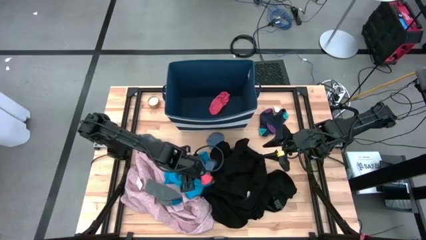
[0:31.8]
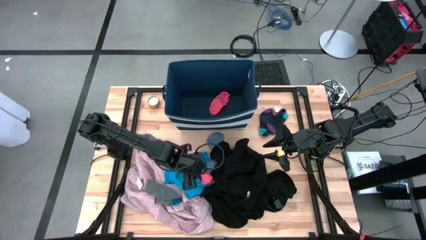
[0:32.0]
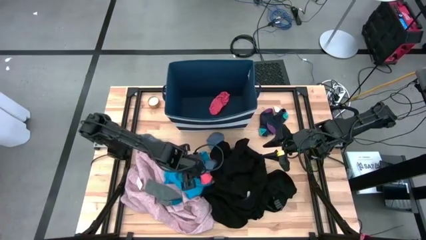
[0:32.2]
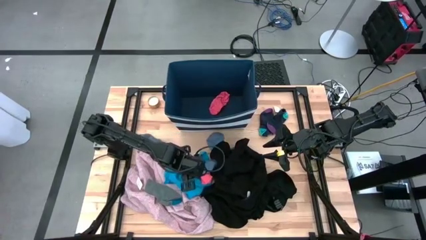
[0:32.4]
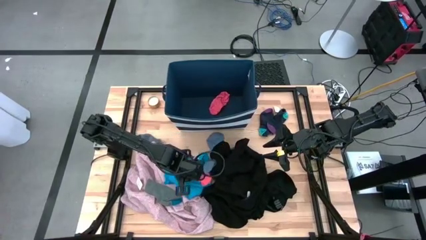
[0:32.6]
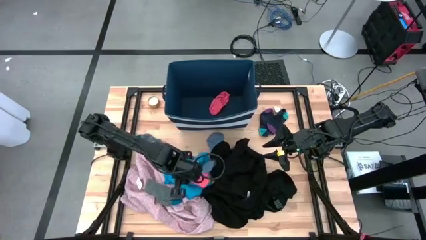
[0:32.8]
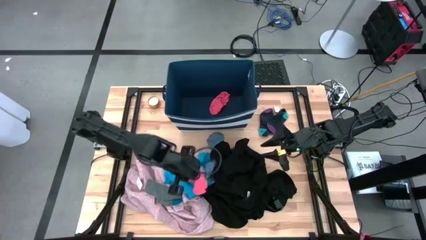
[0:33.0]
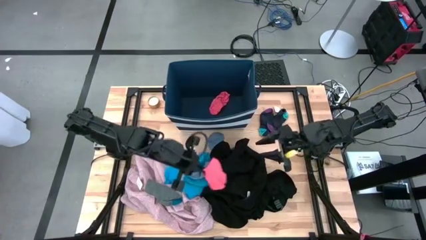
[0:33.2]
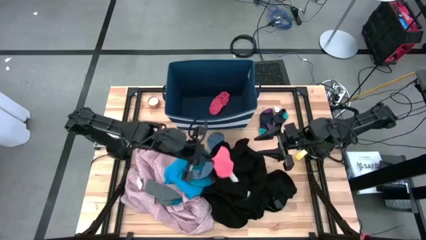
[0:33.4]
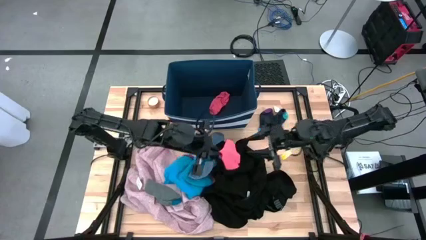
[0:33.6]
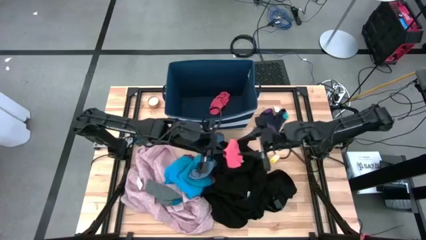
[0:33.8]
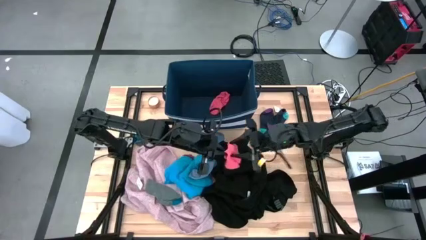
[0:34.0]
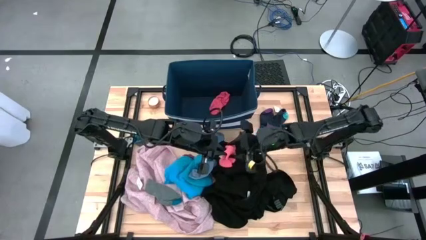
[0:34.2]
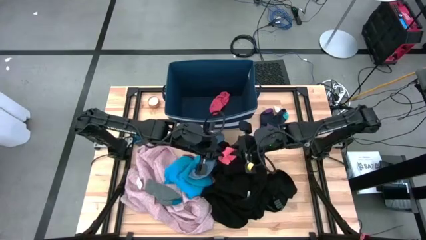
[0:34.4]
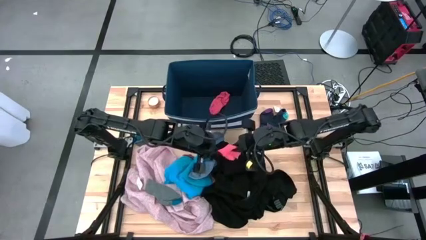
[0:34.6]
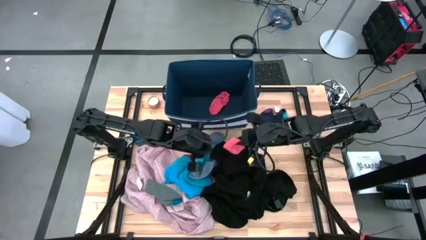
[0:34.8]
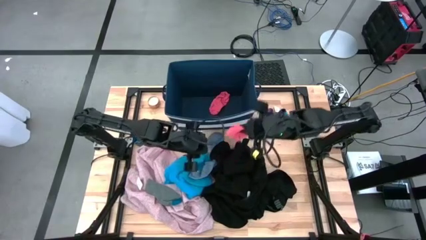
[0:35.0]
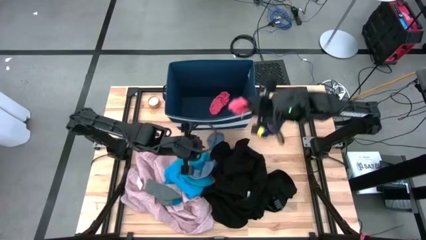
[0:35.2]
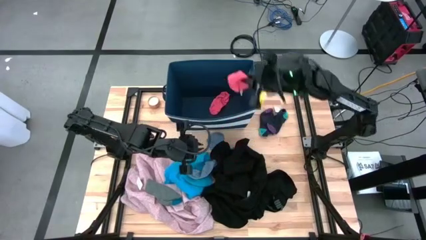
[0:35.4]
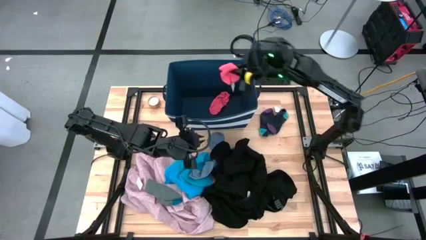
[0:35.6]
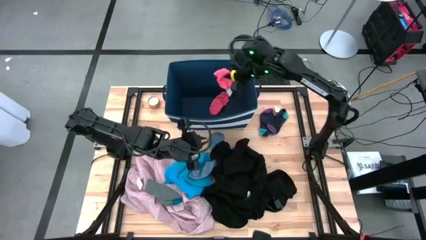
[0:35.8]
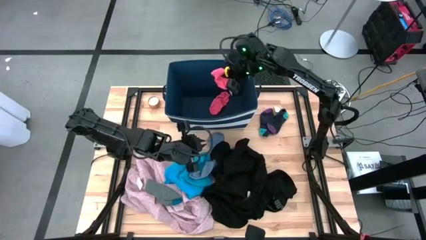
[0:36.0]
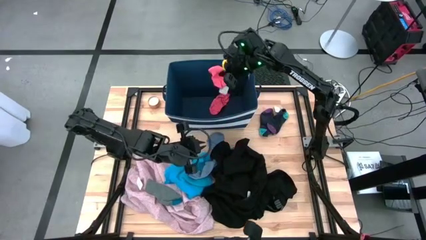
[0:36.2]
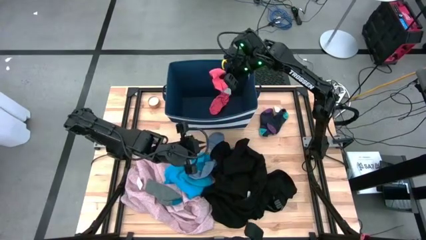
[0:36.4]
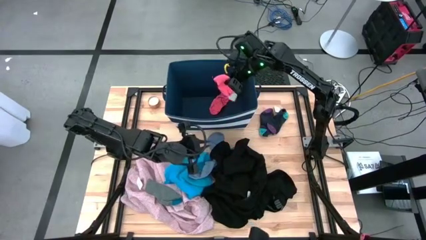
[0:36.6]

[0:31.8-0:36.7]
Task: Sort clothes
Put the pink sock into the blue laundry bin

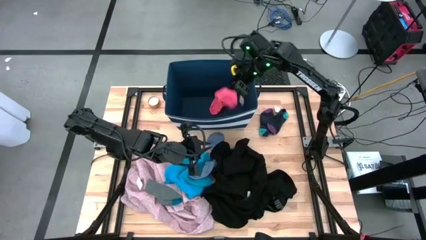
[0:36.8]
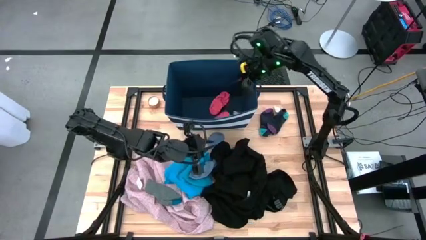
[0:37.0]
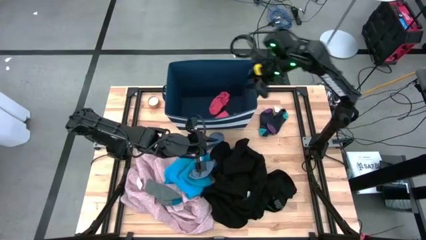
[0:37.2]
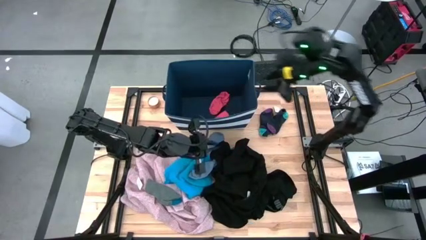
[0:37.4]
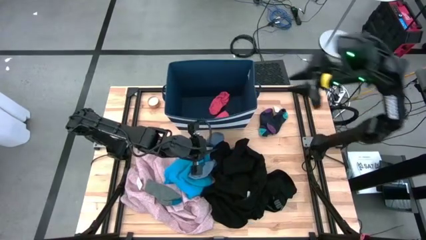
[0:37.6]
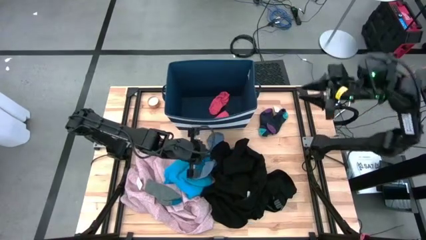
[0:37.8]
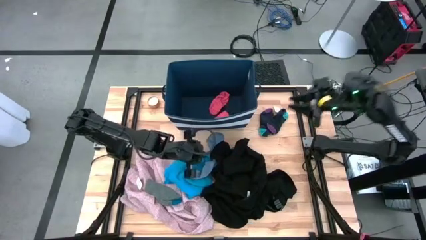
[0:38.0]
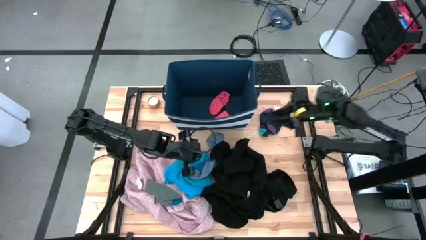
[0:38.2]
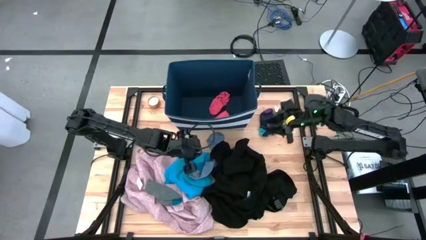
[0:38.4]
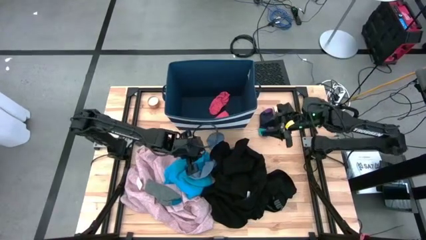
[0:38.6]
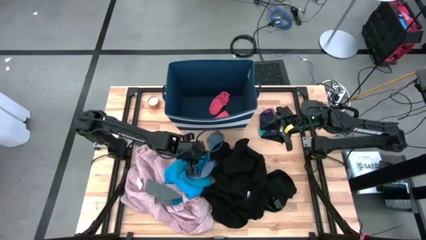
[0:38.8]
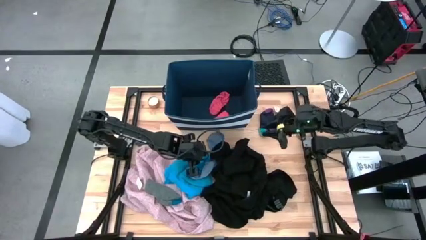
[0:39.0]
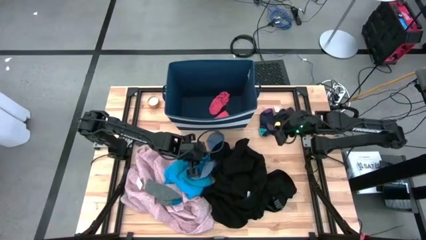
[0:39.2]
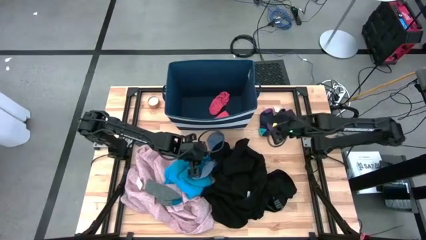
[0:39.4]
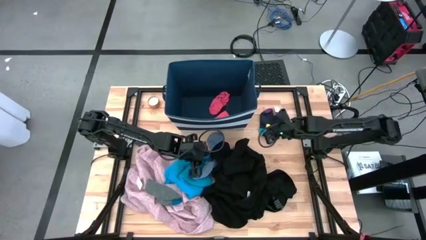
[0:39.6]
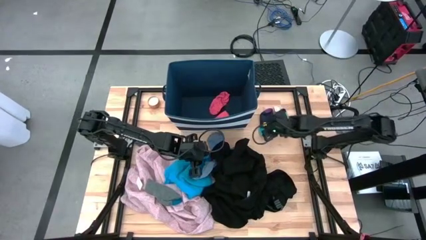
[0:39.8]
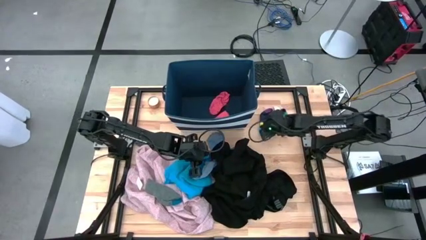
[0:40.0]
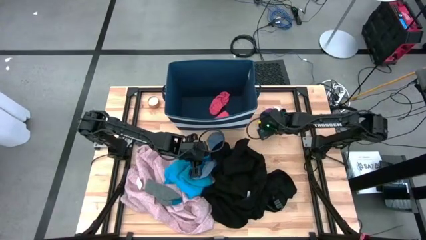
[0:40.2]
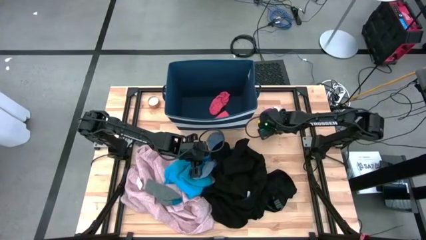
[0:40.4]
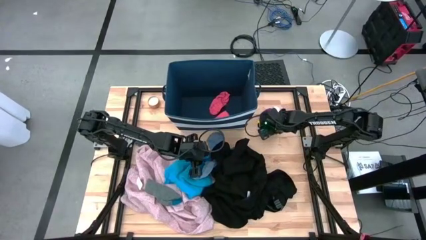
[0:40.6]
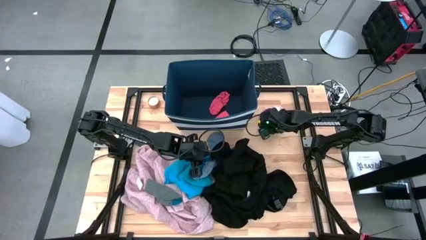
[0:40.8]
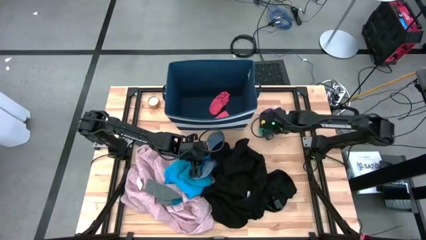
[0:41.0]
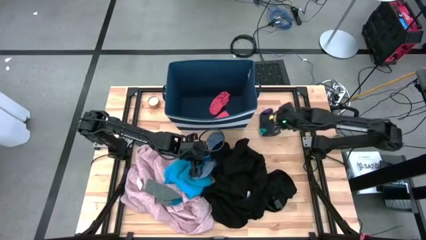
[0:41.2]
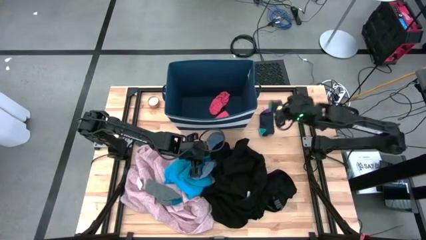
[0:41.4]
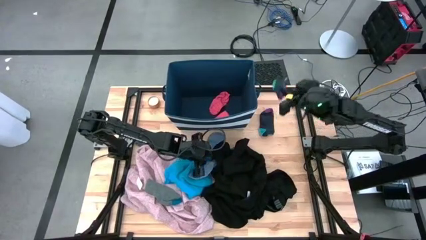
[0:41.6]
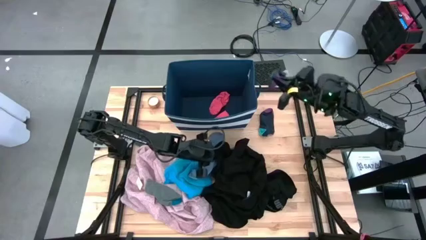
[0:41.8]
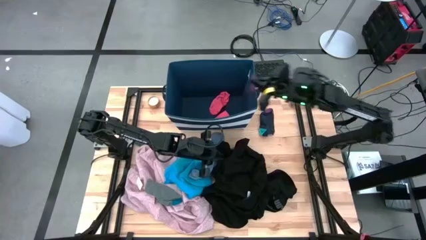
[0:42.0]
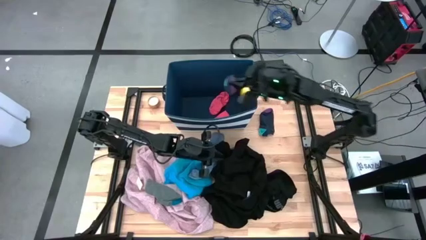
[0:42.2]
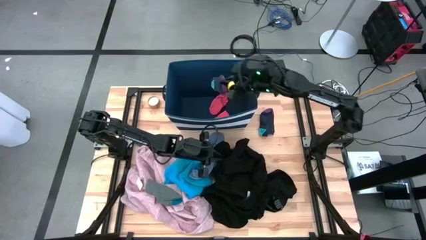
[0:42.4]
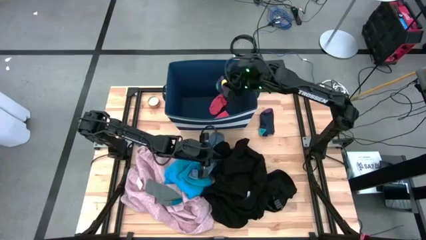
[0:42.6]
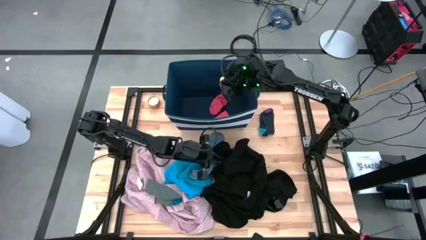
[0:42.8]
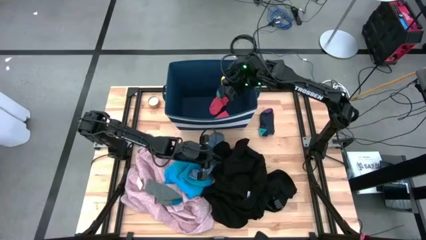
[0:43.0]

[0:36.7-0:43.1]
Put the dark blue sock into the blue laundry bin

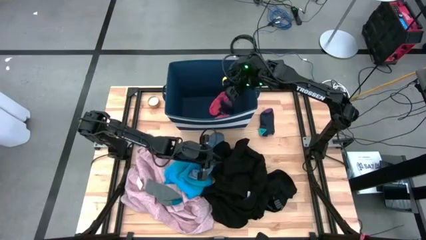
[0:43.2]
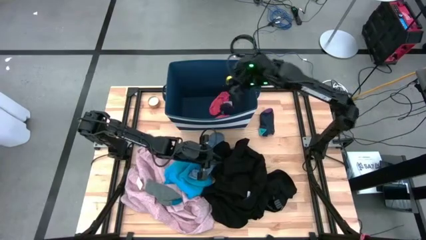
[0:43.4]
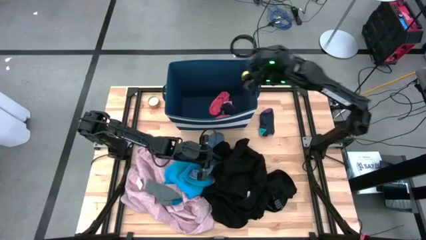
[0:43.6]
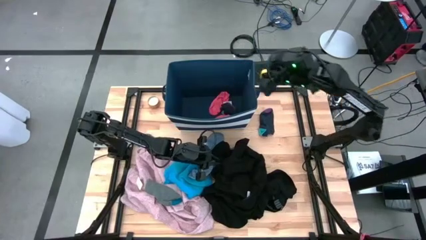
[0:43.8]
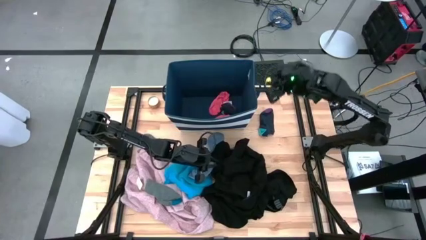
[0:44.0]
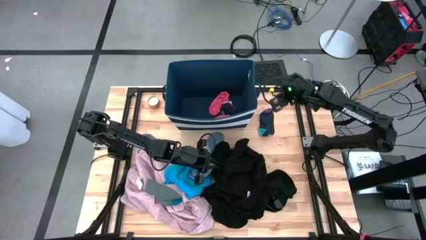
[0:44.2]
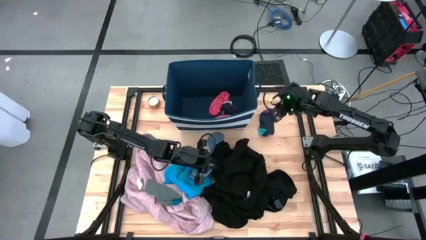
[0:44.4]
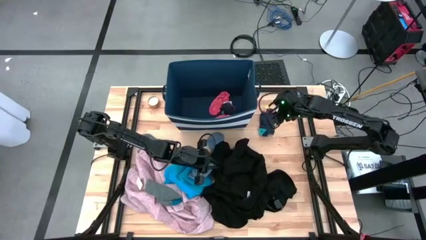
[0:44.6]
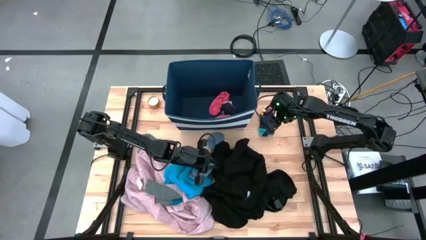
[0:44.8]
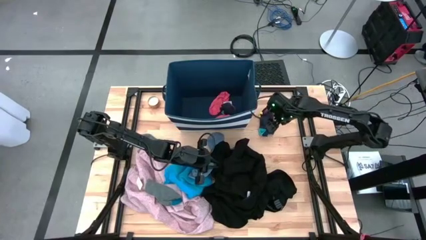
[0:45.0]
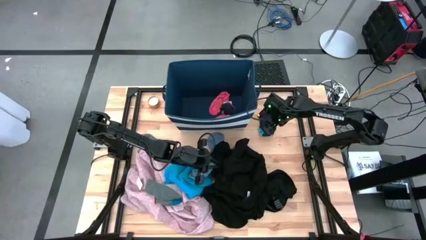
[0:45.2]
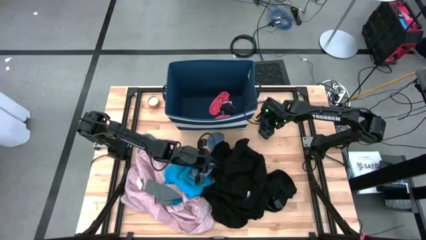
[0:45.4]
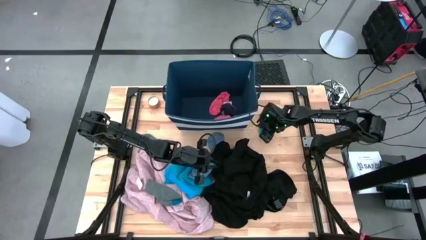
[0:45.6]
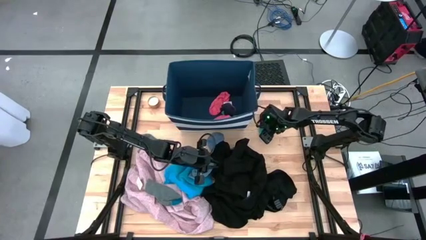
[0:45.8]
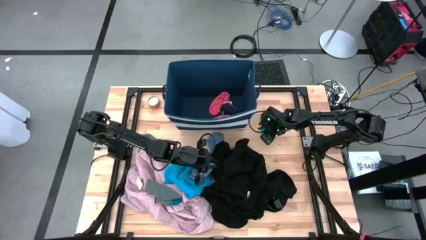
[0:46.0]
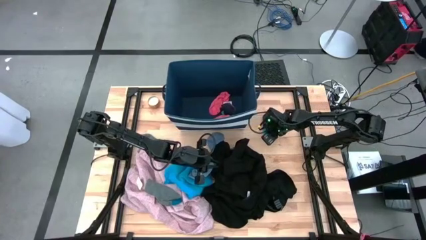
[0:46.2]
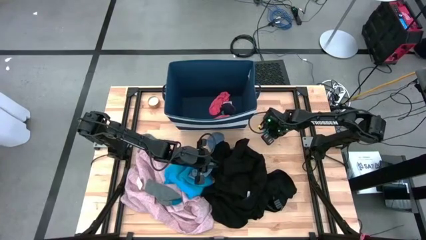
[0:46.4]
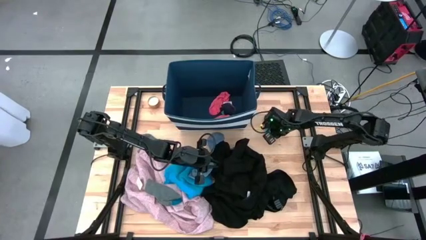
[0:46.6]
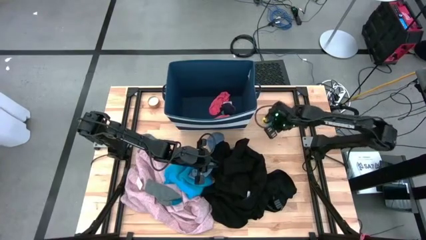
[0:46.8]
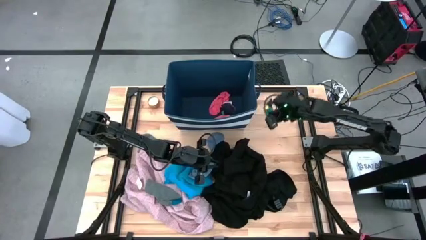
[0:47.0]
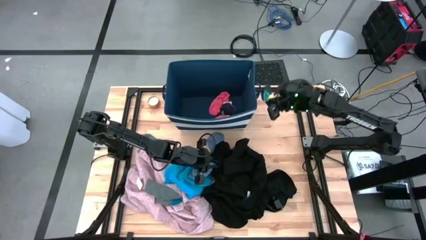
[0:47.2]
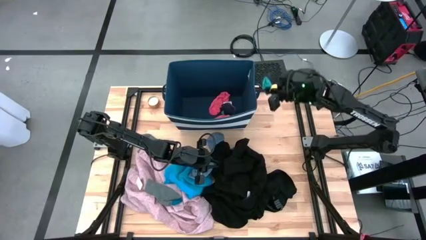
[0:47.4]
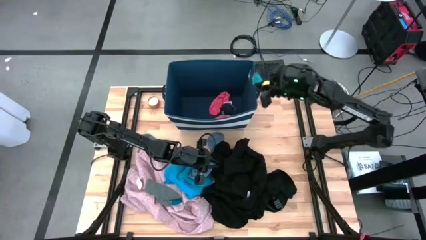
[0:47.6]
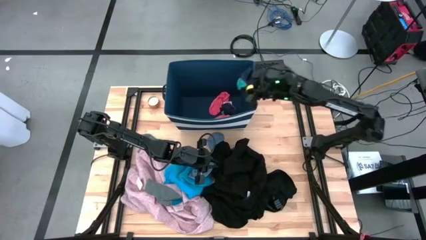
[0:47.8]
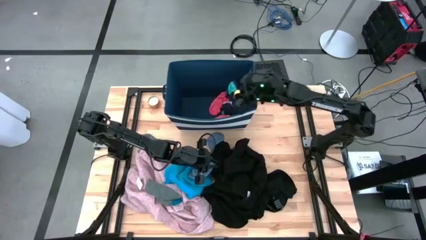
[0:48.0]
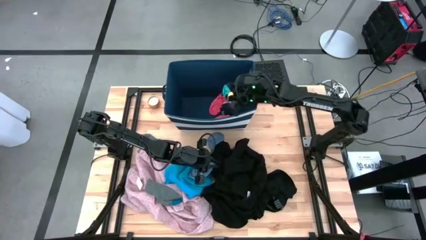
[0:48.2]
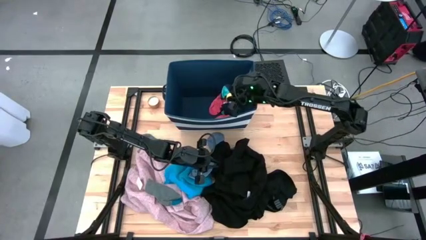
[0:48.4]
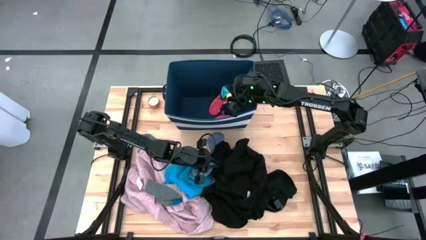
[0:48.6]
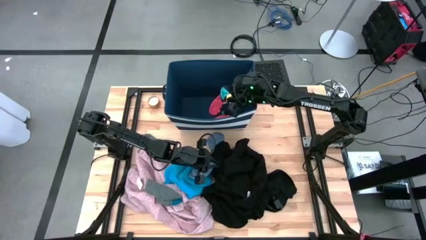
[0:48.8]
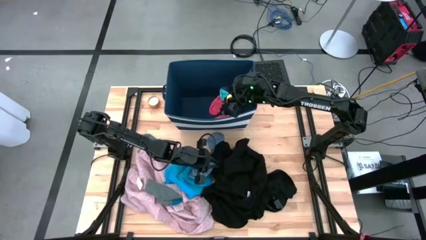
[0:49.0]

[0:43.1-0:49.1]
Put the dark blue sock into the blue laundry bin
